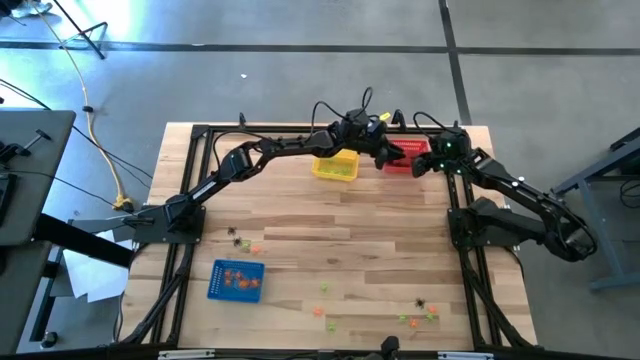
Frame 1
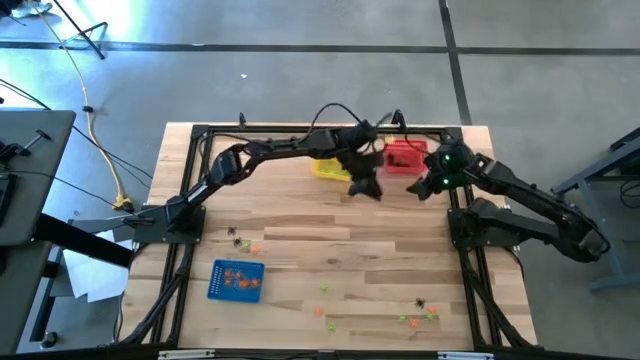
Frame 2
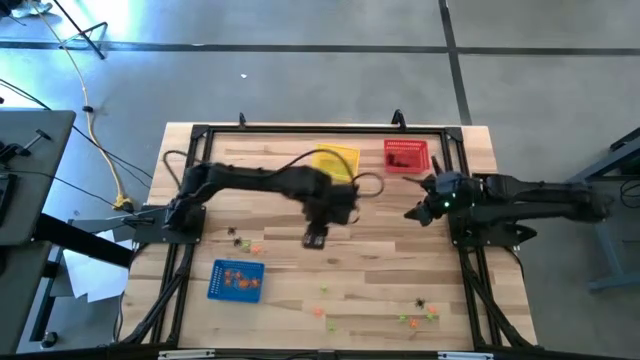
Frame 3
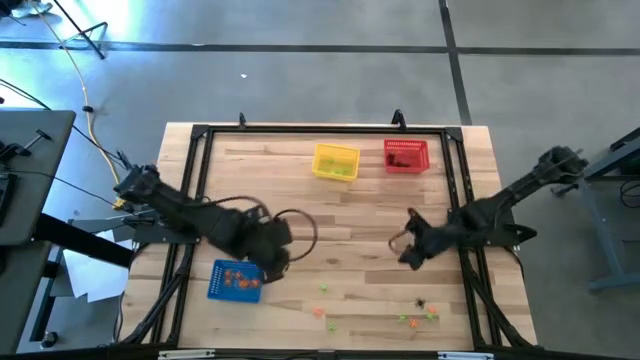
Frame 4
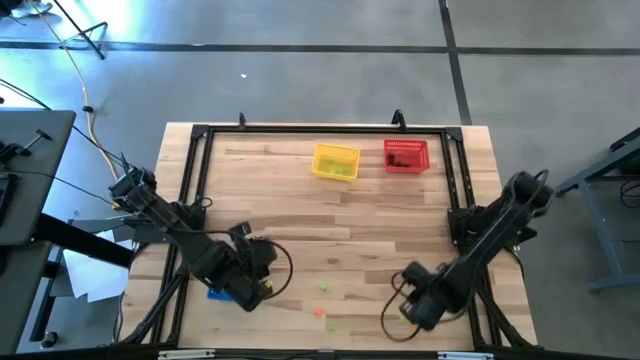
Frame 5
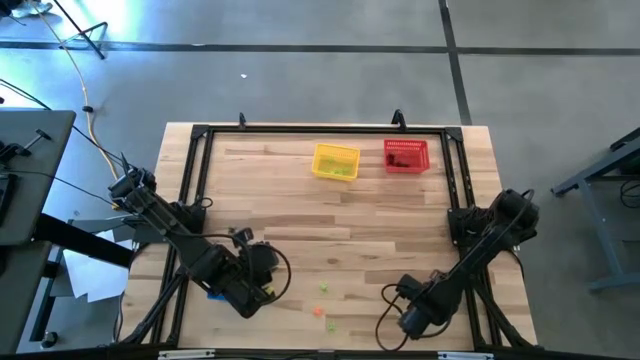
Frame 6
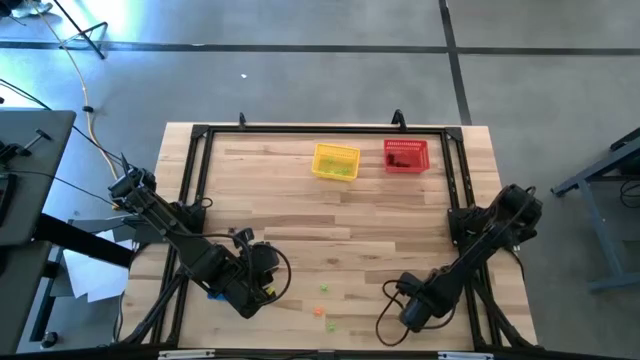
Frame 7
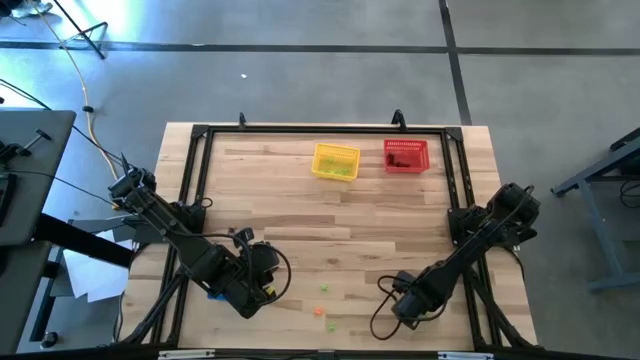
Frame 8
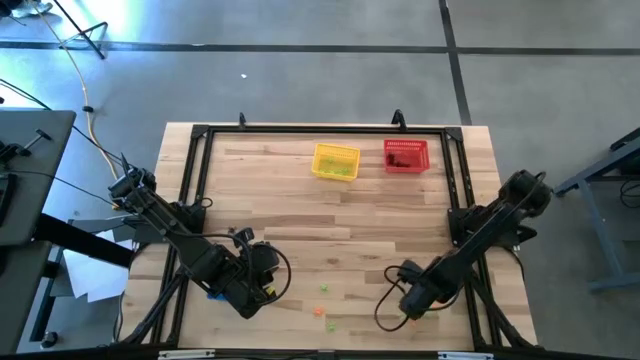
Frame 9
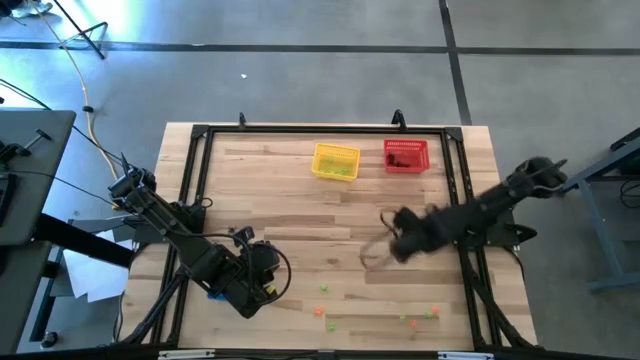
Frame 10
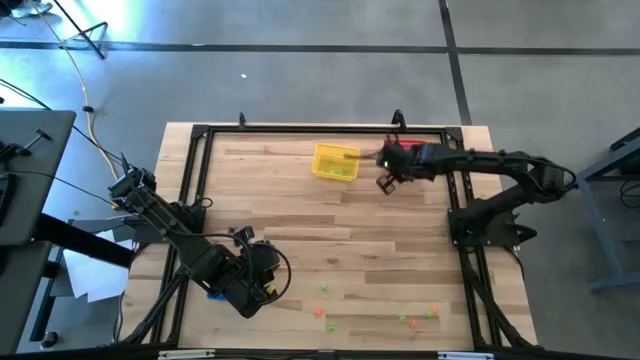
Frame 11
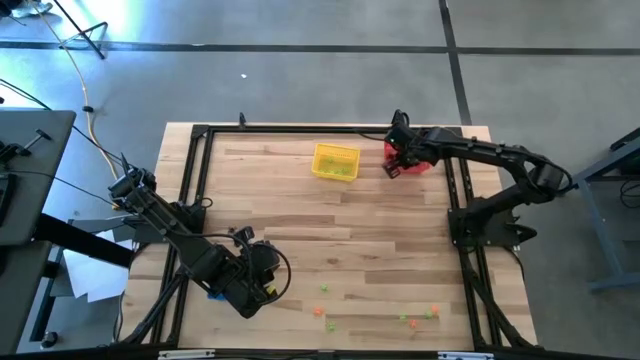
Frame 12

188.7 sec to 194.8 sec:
Task: Sort Halloween decoration
Put the black spider toy into the red bin

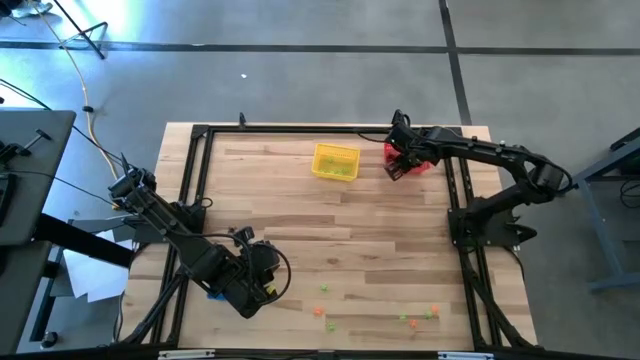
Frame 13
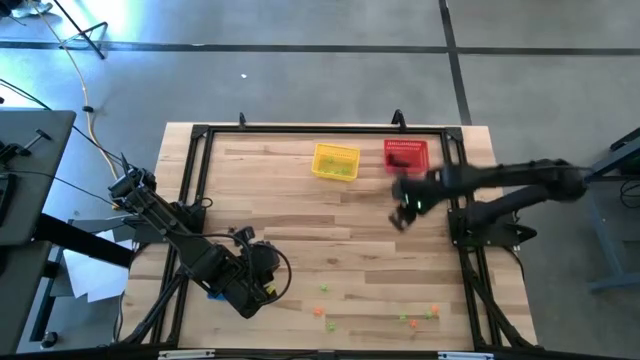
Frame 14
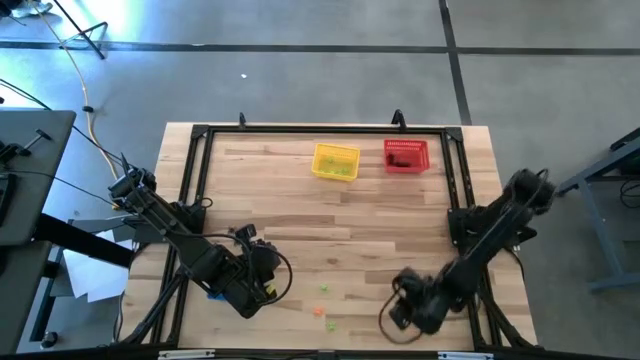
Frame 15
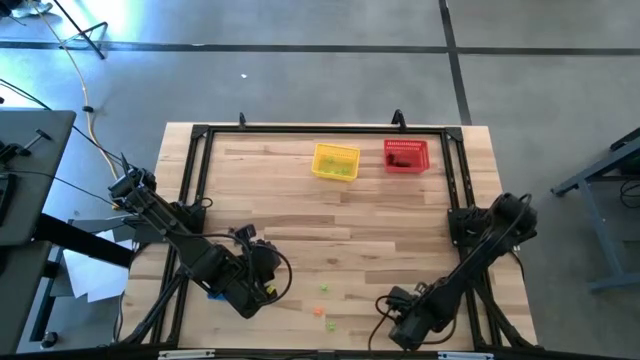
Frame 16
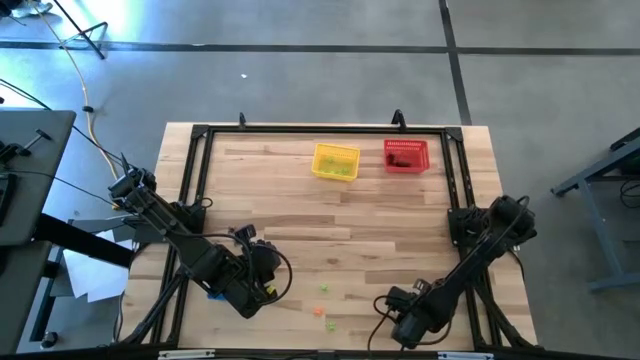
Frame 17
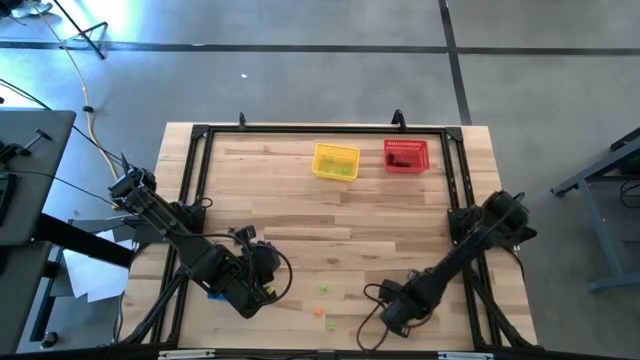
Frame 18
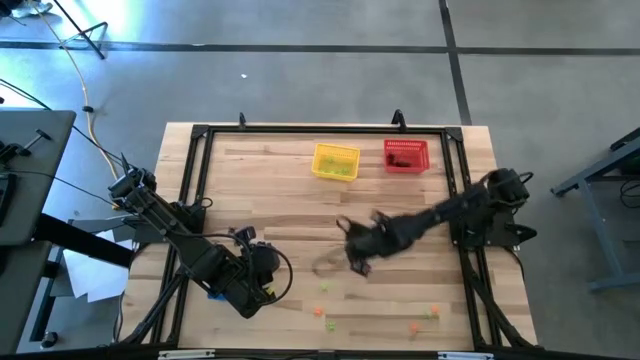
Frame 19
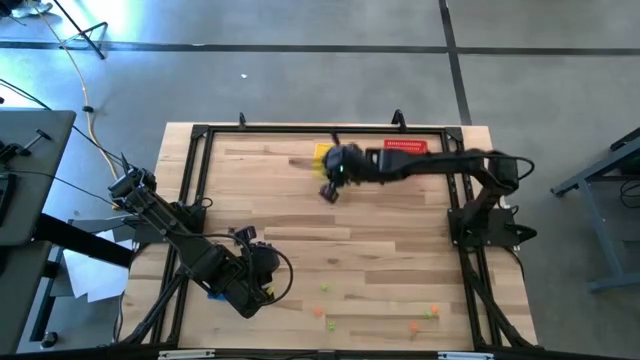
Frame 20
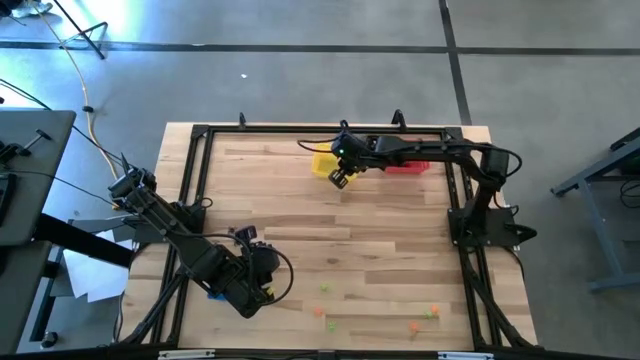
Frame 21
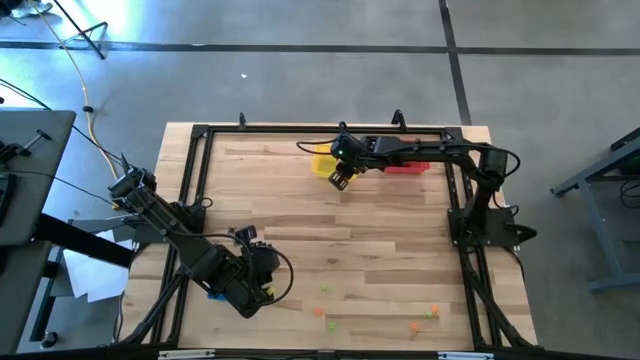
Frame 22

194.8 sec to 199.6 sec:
Put the right green spider toy into the yellow bin

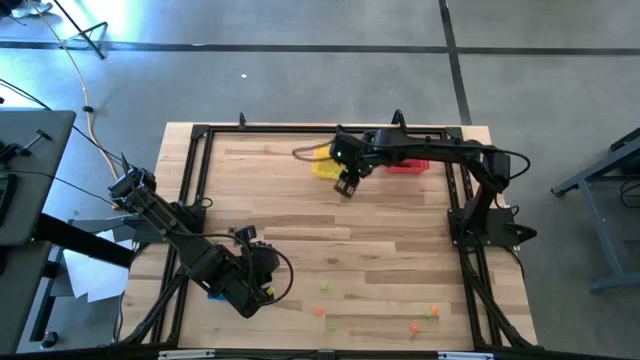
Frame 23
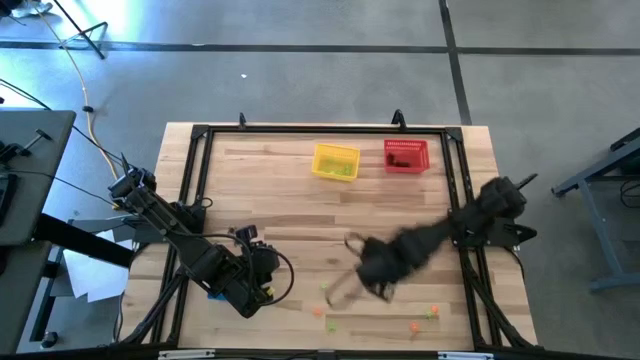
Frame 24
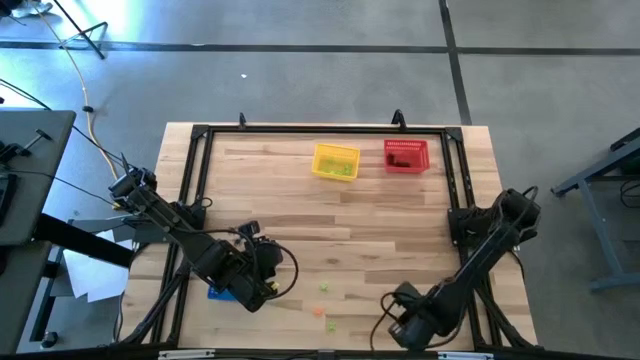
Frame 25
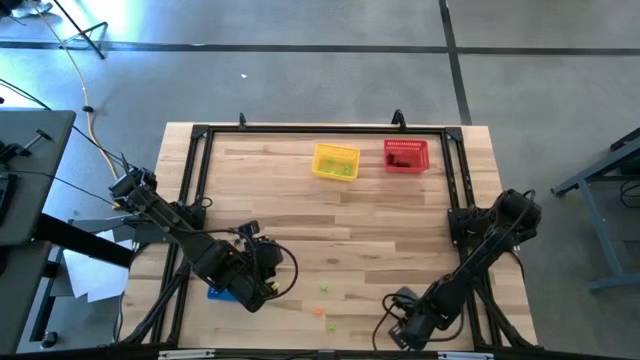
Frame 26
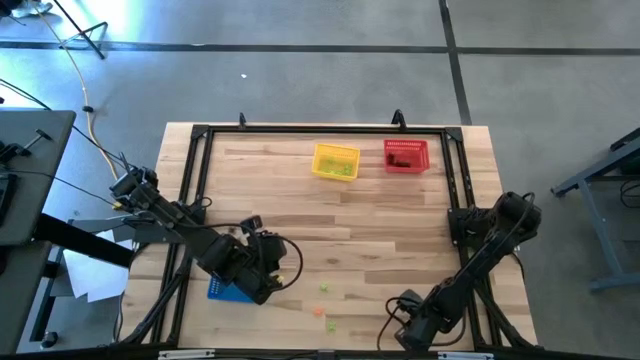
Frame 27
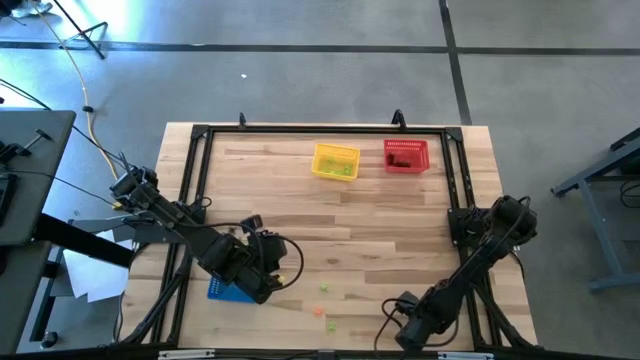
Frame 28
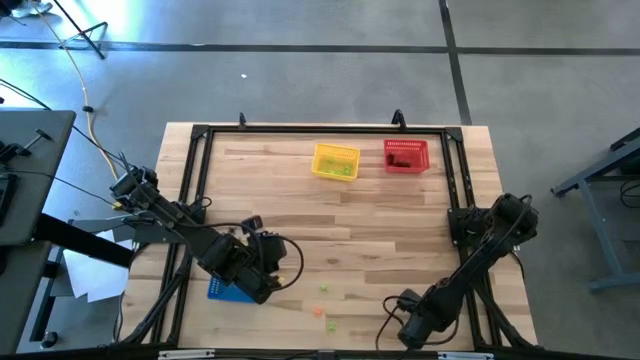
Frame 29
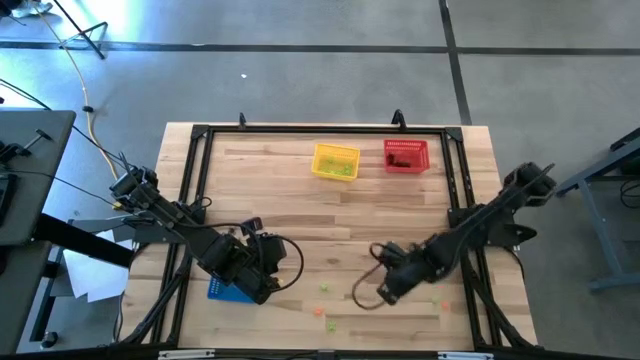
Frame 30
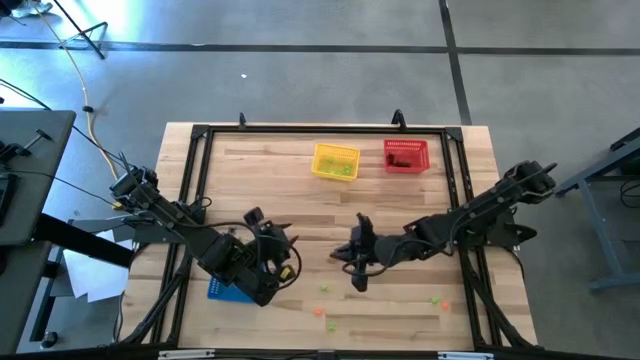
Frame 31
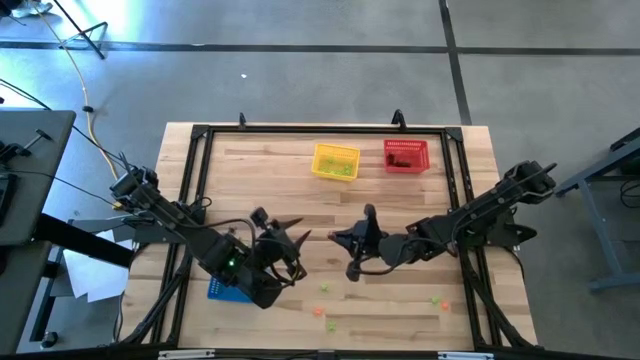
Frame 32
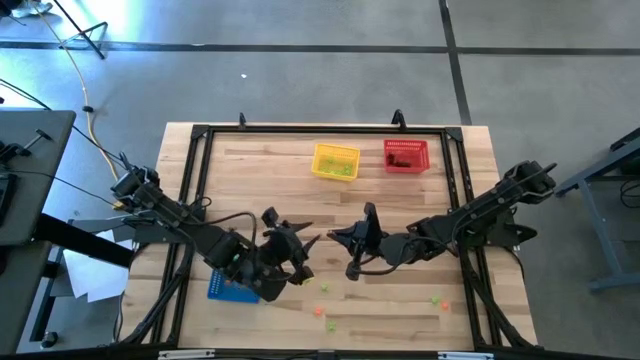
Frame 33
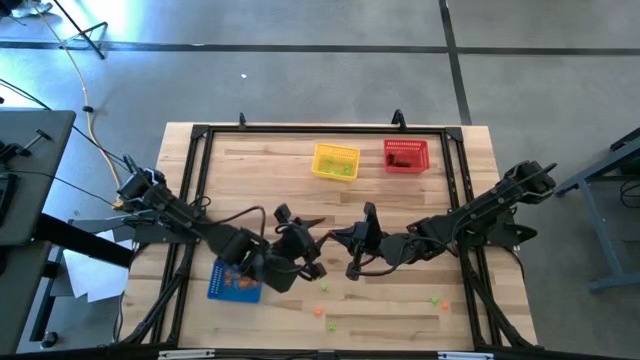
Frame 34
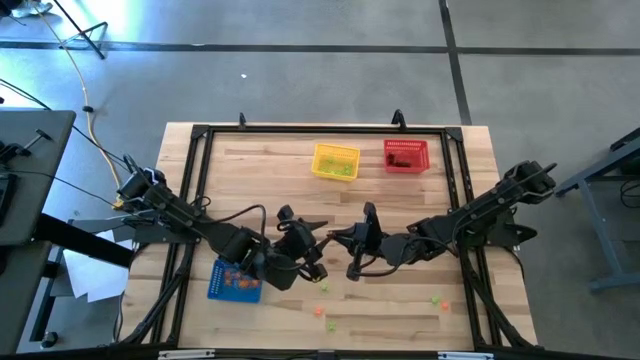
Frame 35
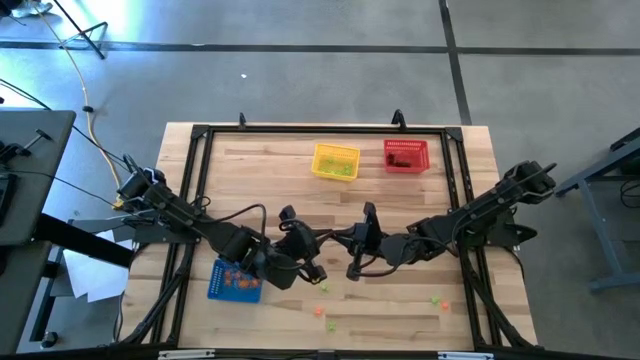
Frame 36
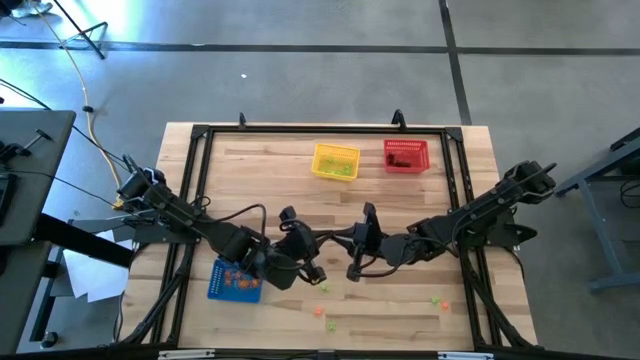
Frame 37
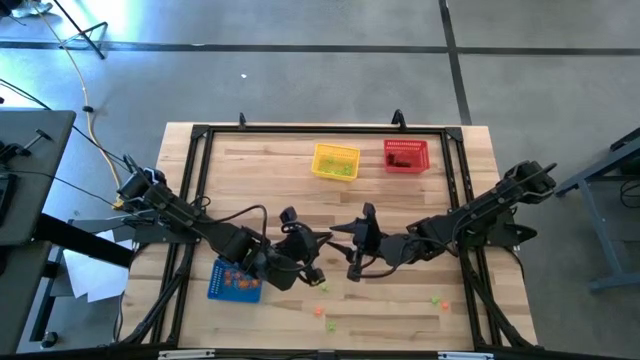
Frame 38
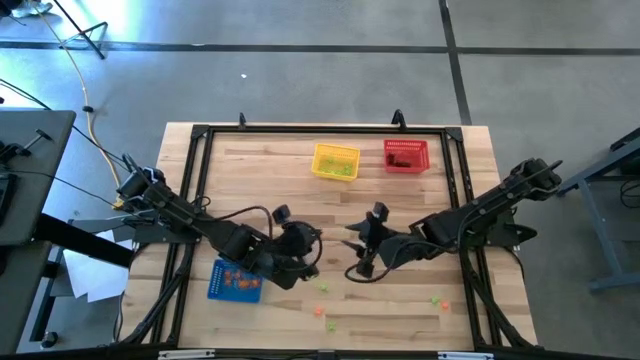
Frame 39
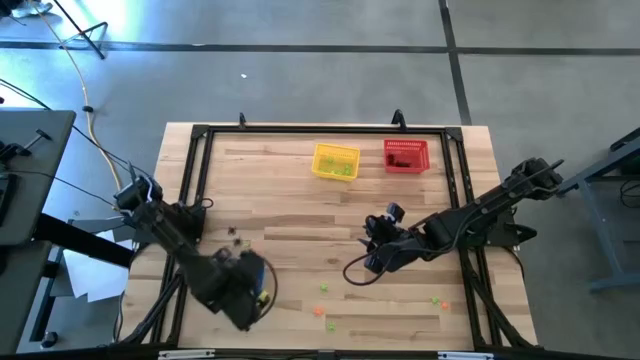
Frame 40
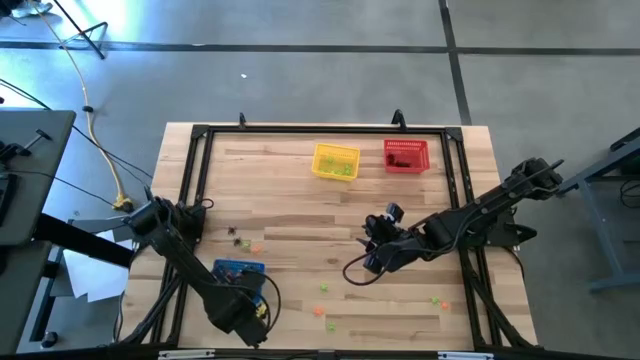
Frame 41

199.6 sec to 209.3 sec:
Put the orange spider toy into the blue bin
